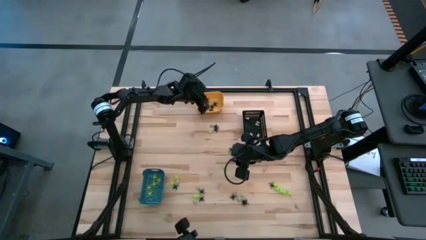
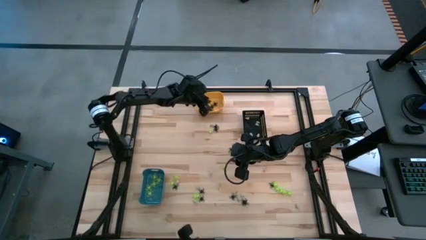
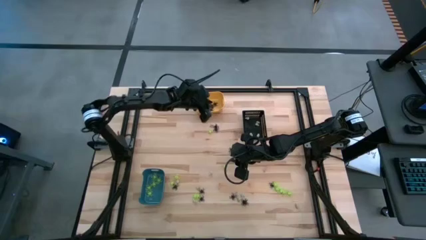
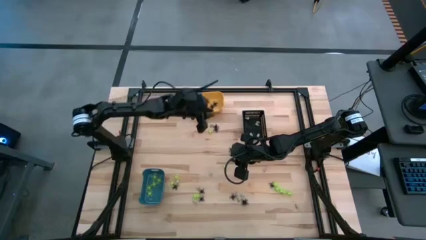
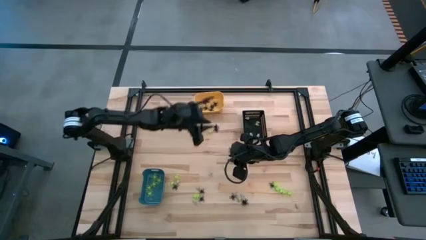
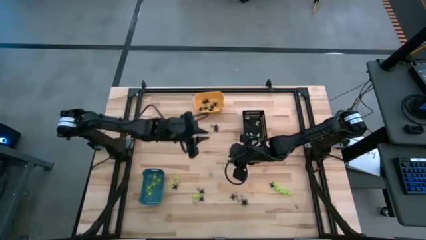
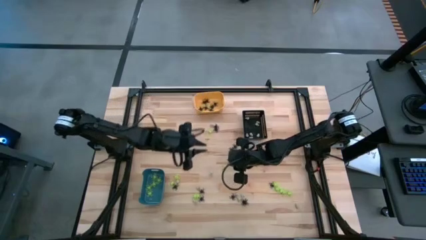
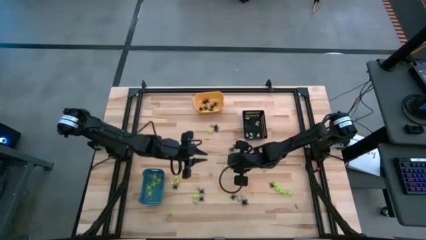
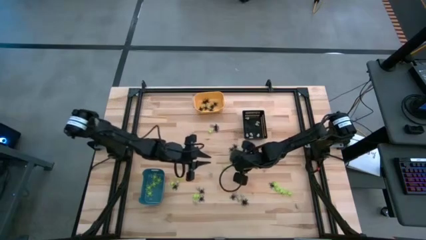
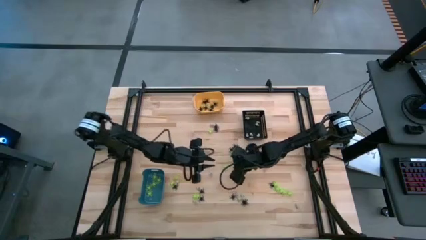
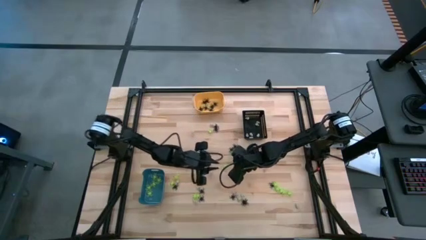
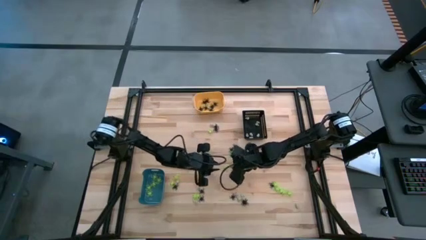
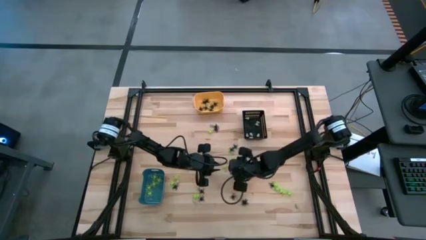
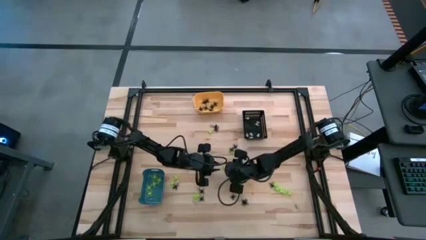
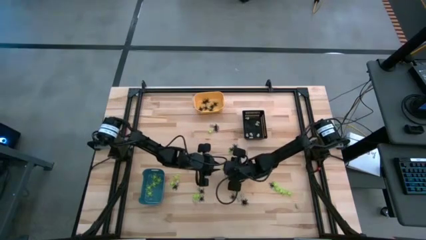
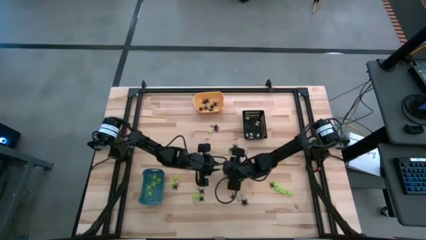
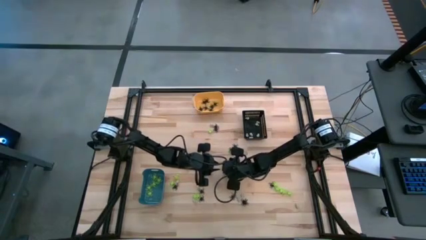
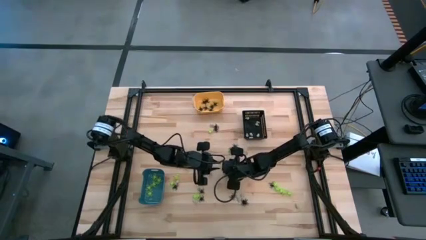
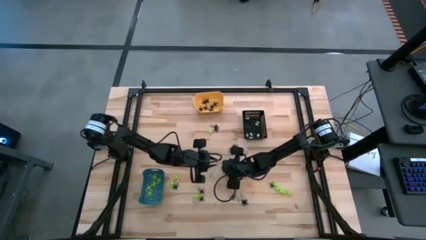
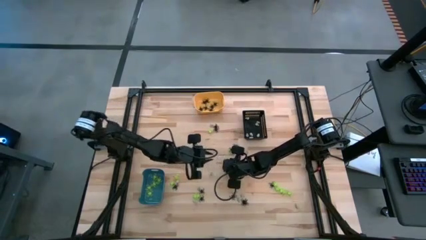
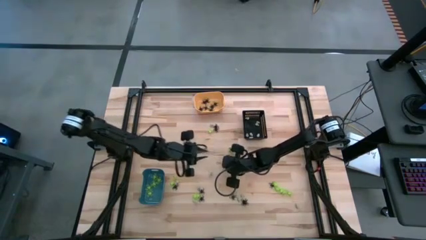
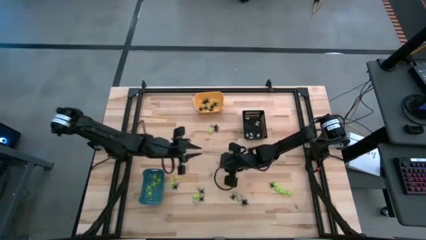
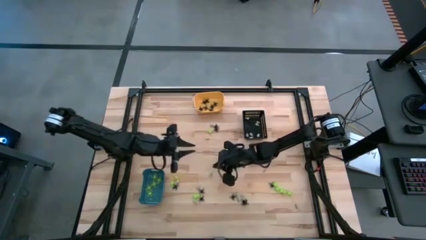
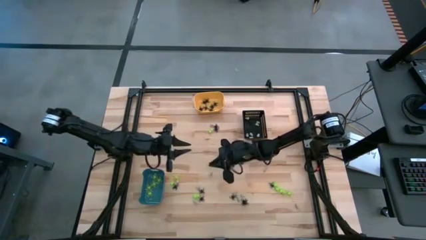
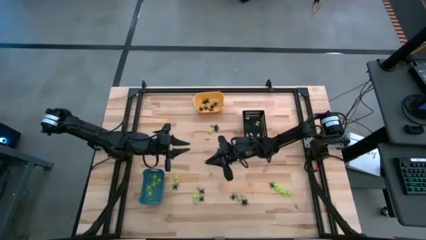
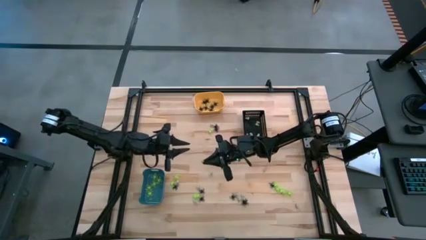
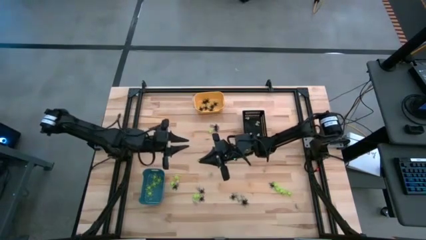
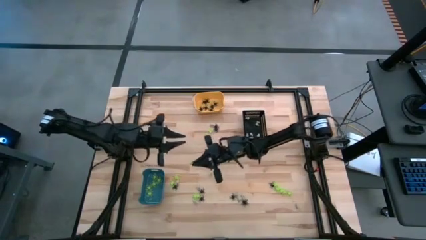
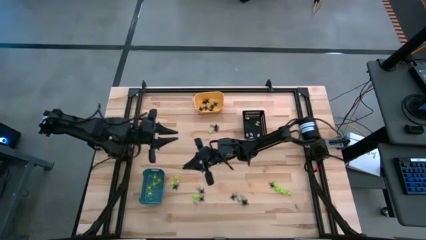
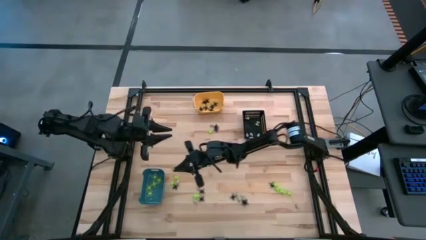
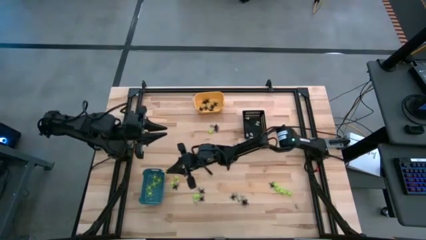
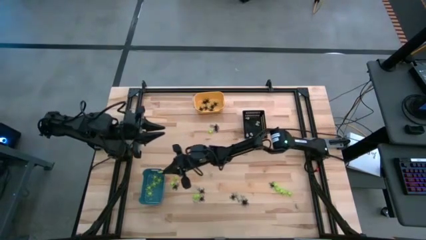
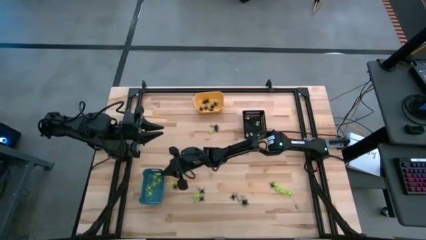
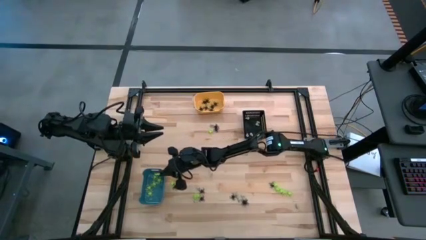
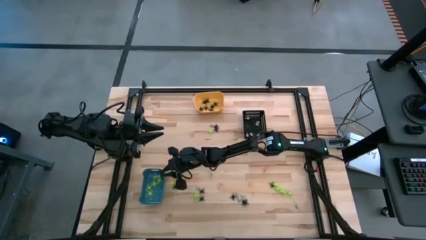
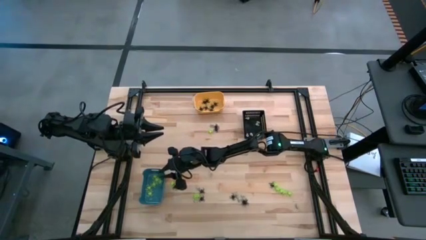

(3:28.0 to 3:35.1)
Task: Sort Halloween decoration
Put the green spider toy into the blue bin

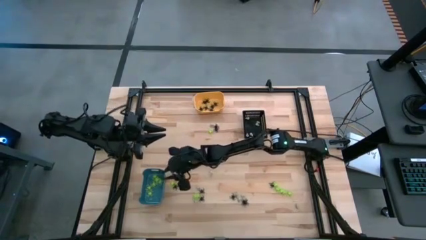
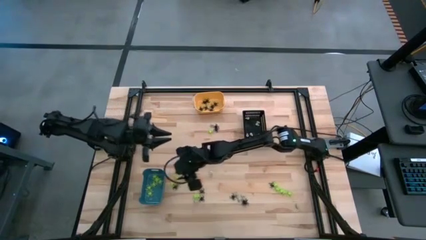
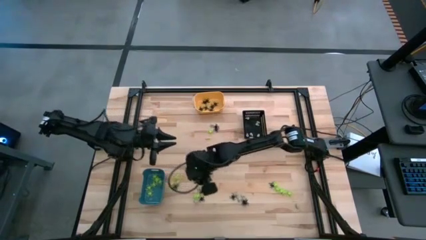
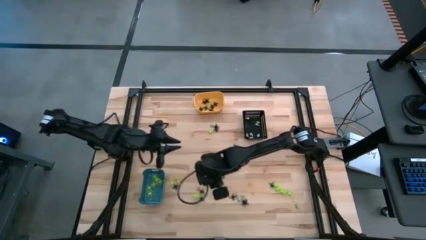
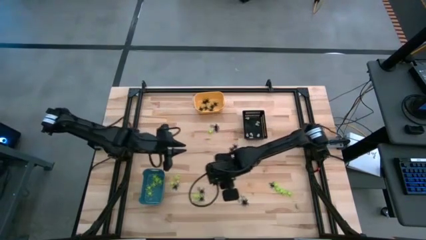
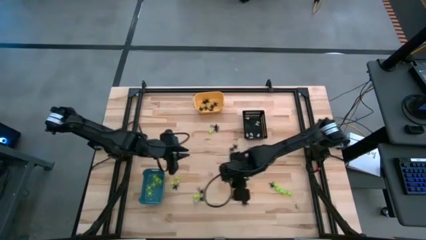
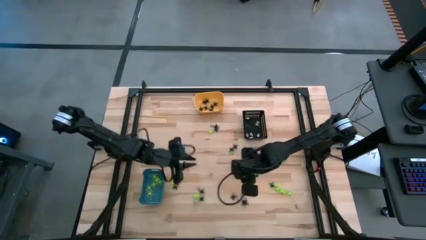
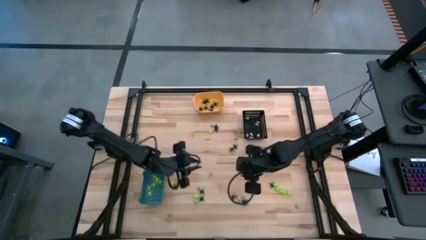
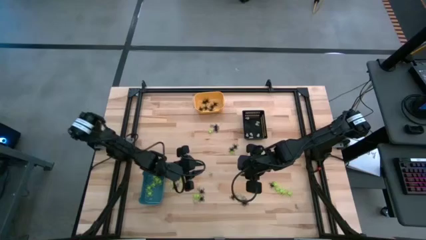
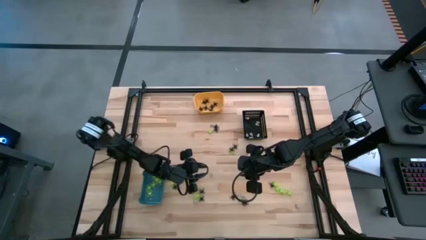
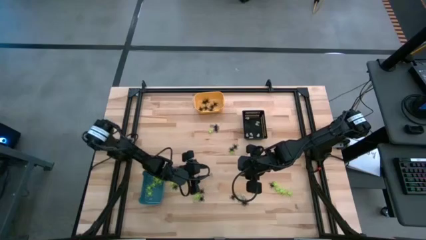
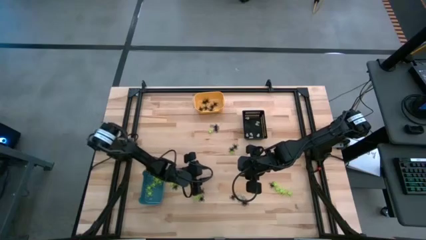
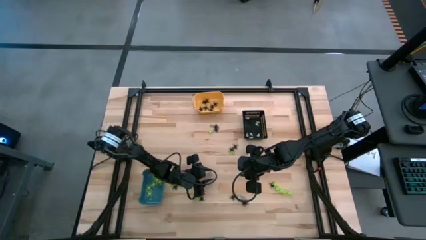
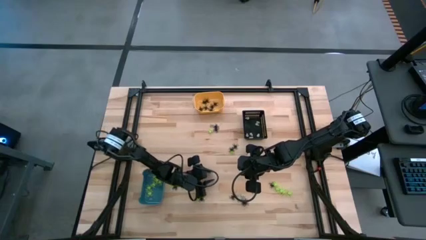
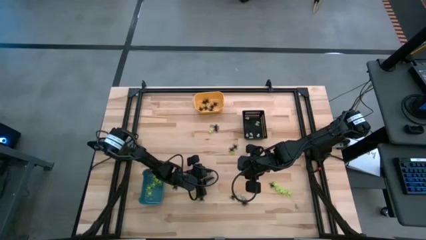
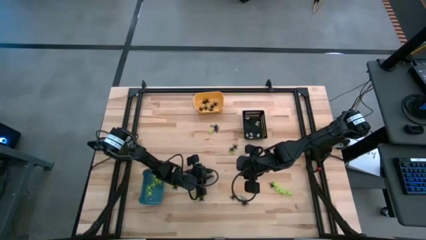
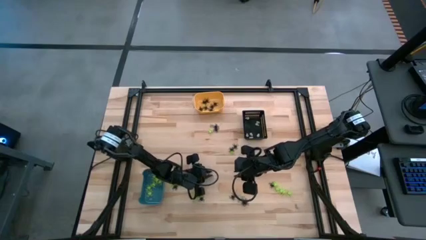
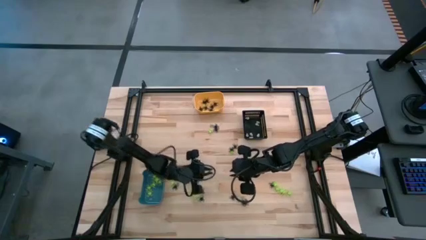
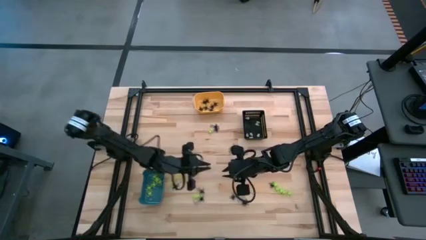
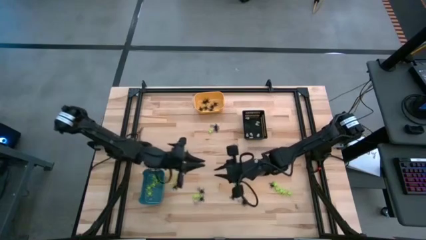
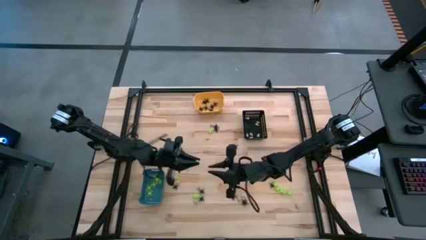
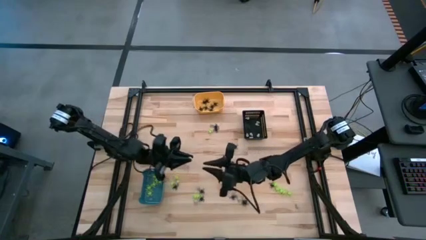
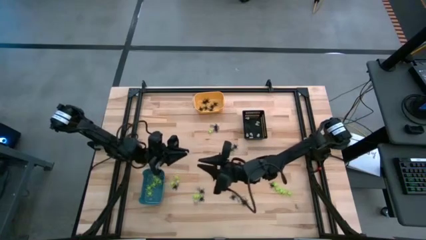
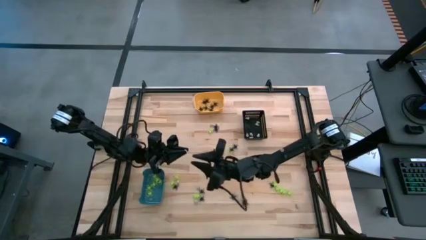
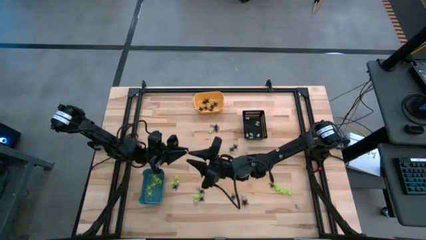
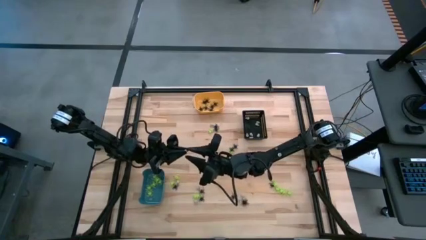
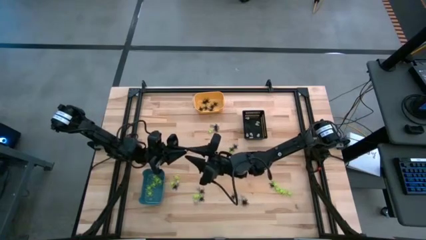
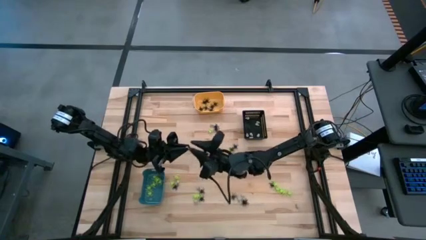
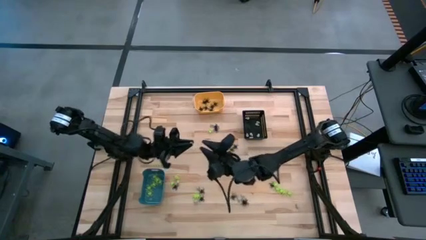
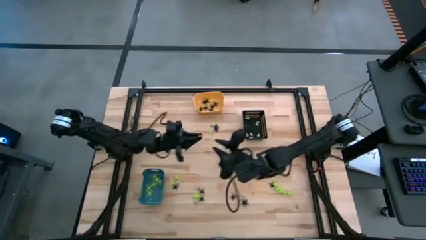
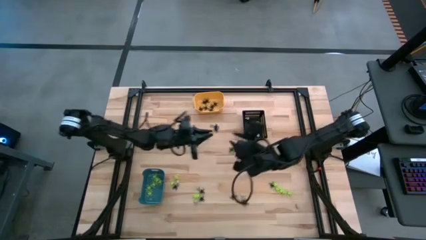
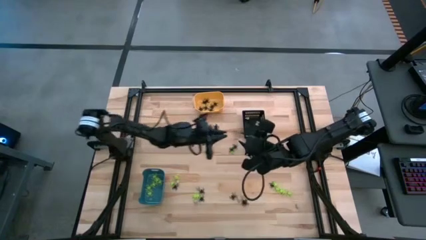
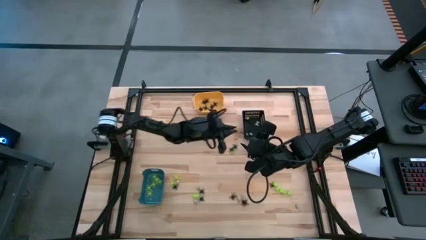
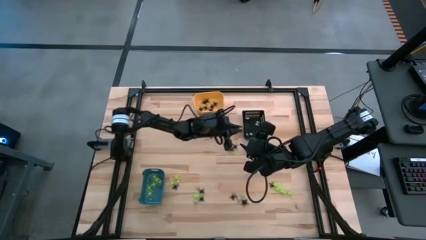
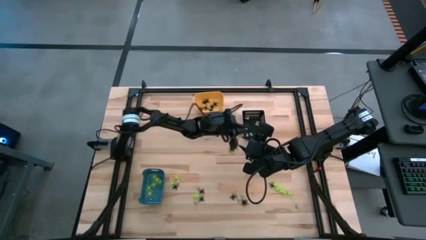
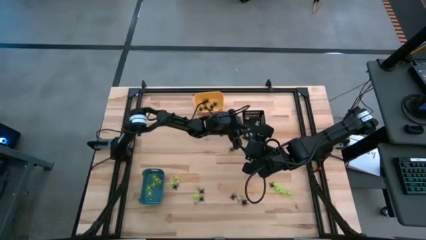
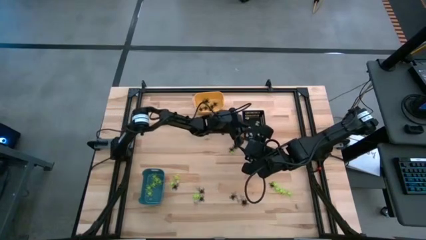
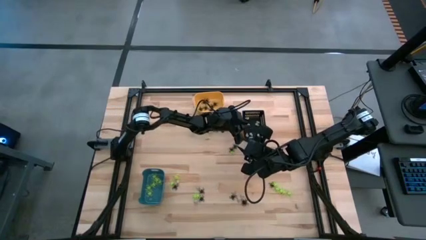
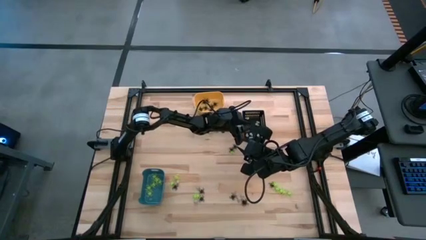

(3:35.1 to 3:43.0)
Put the white skull toy into the black bin
